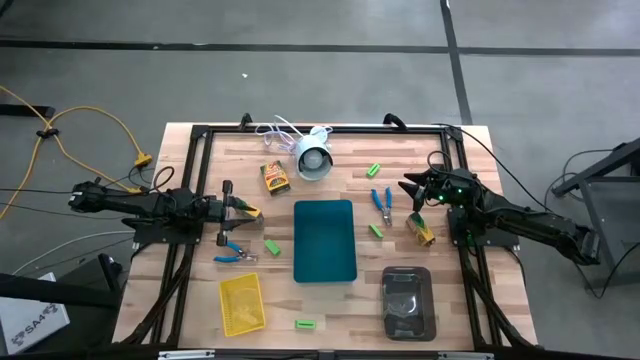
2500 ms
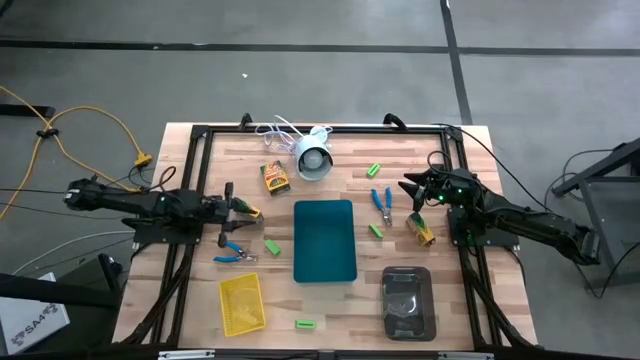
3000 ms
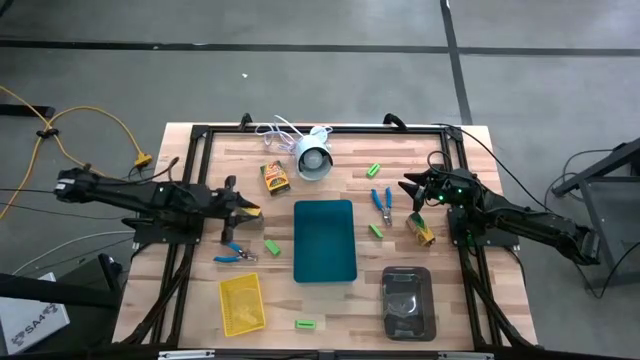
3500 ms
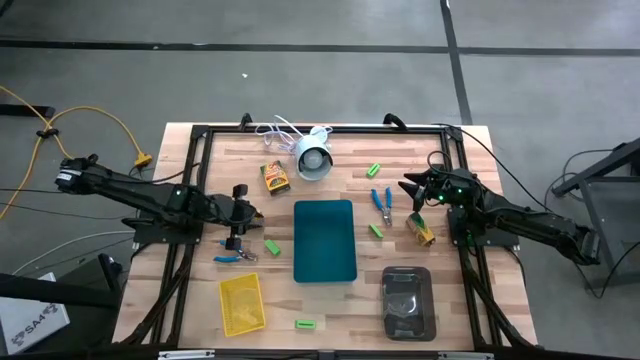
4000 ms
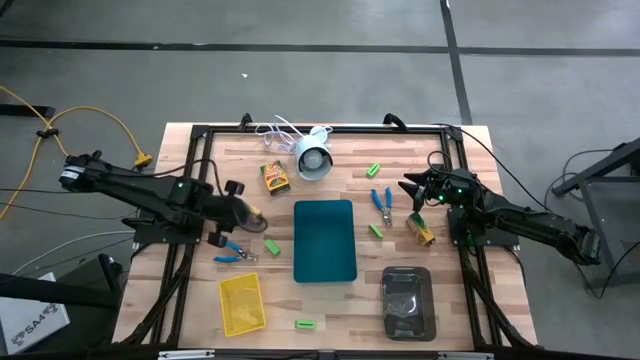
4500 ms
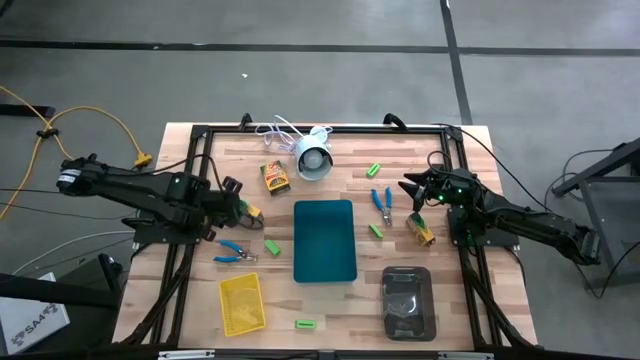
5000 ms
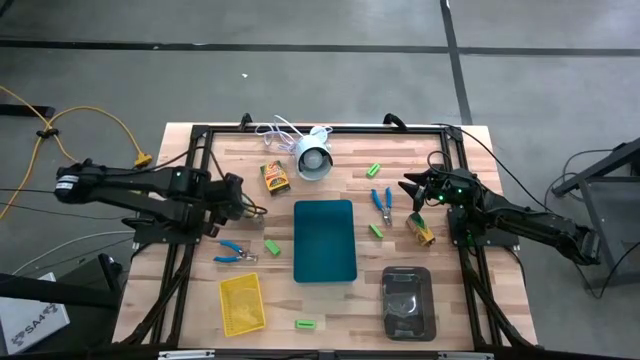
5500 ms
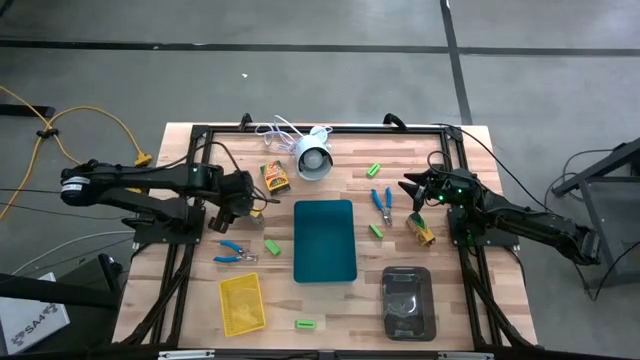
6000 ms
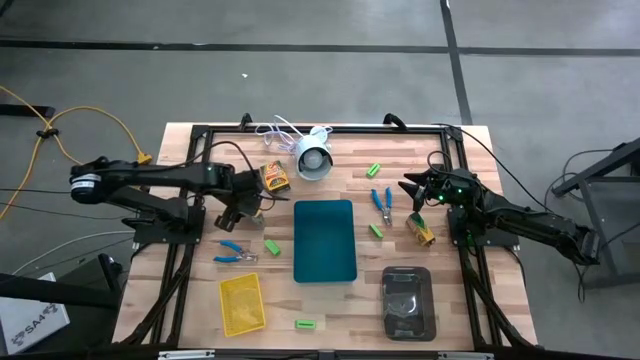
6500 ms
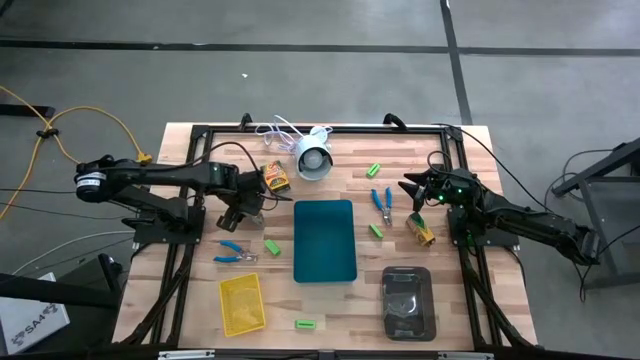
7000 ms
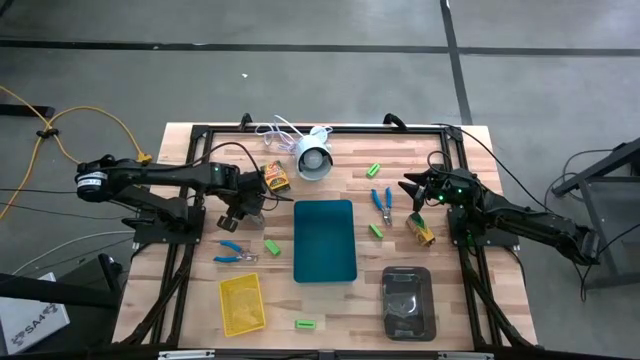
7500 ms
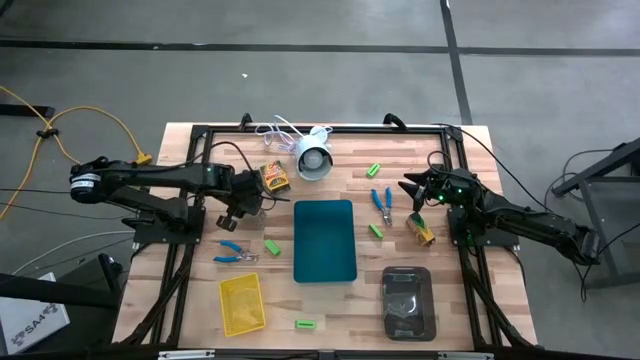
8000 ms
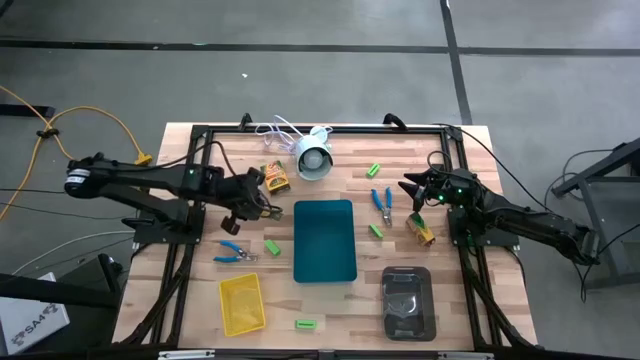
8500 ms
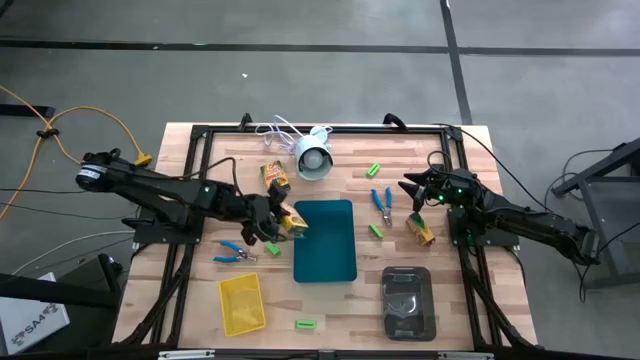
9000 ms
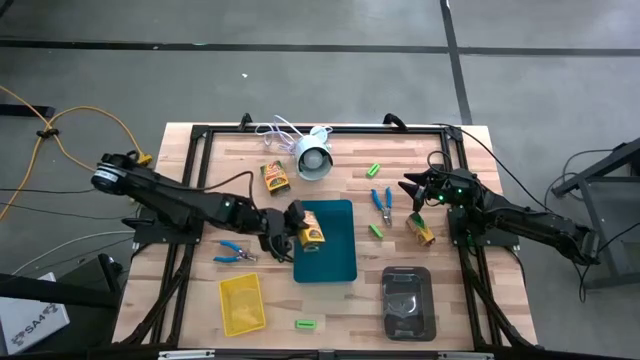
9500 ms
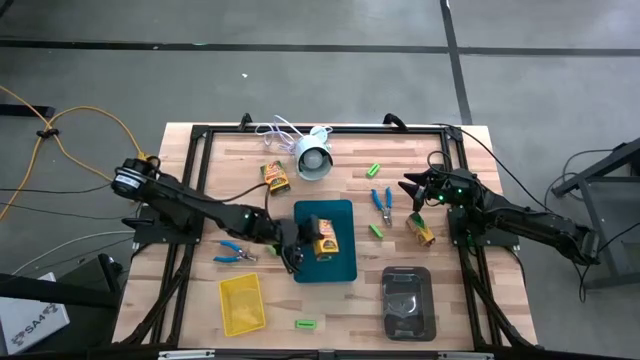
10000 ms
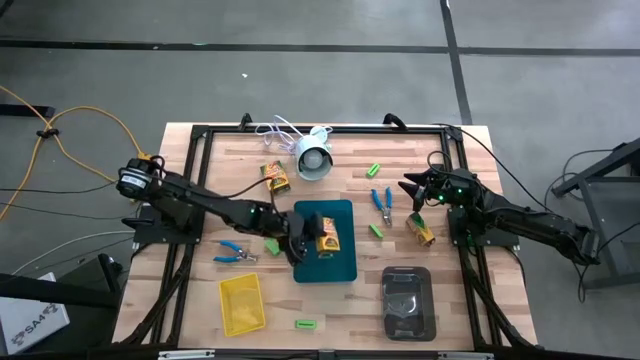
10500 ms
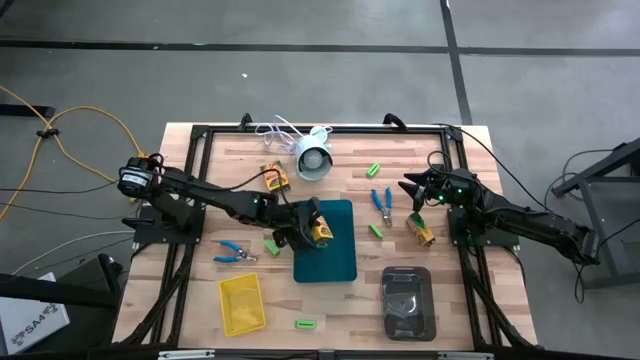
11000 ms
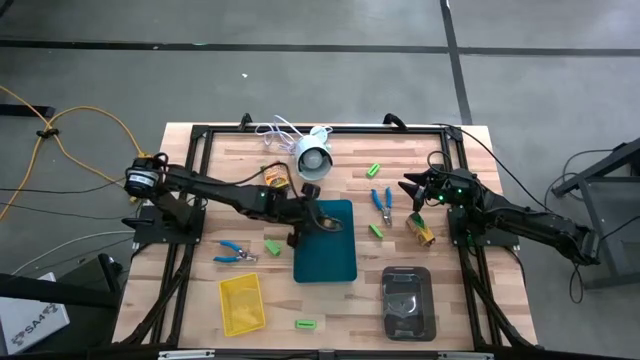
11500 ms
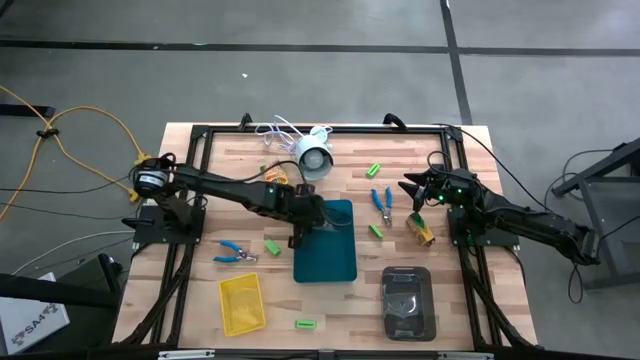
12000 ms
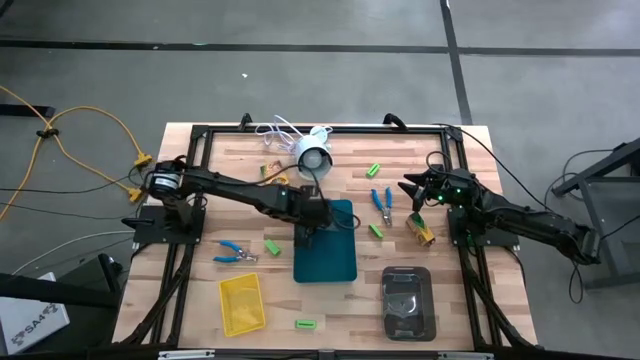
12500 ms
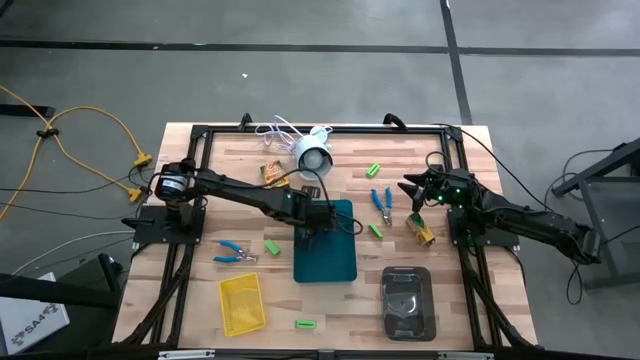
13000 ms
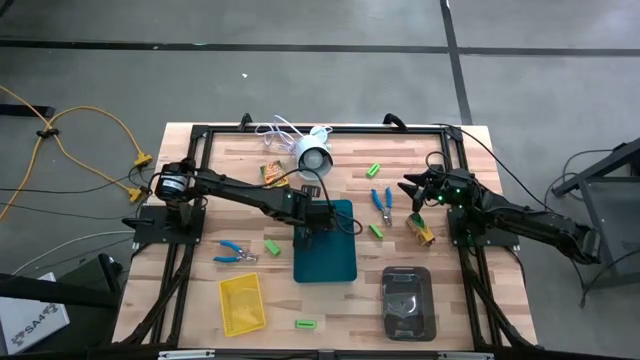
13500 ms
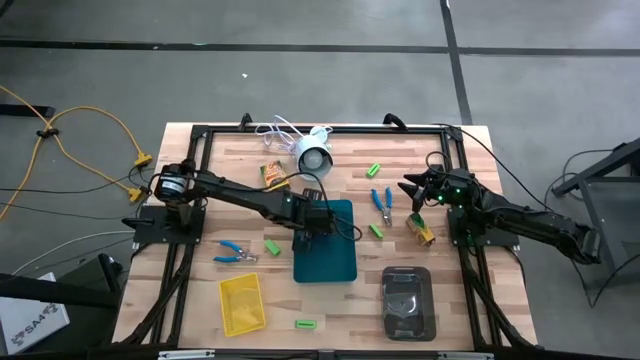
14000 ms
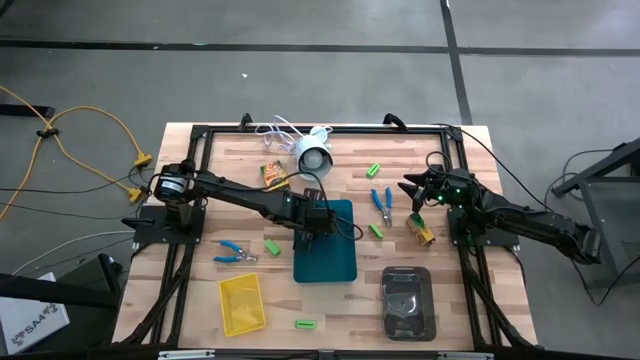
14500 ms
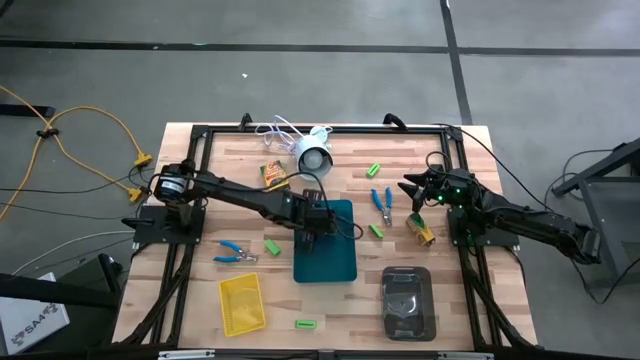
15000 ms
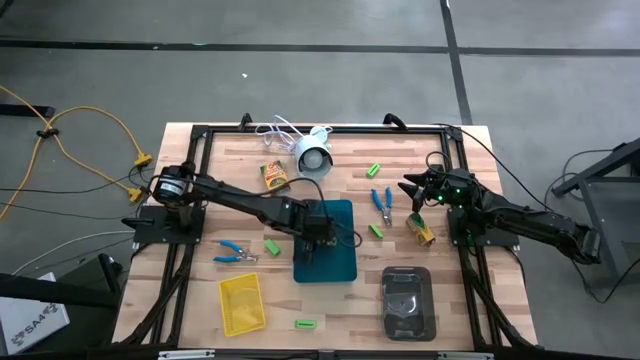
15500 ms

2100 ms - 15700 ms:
Task: Pick & Place School Supplies
Put the yellow crayon box into the blue bin

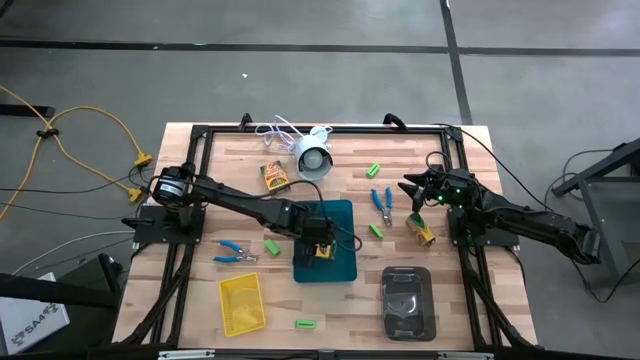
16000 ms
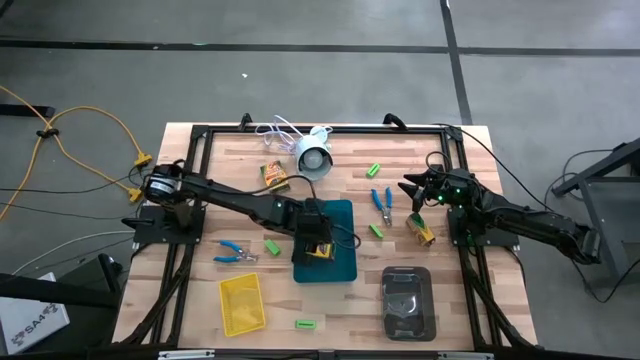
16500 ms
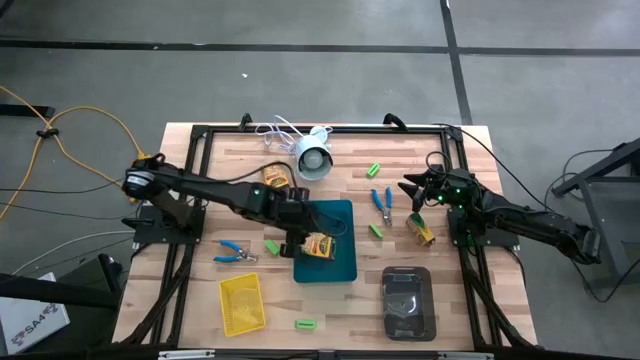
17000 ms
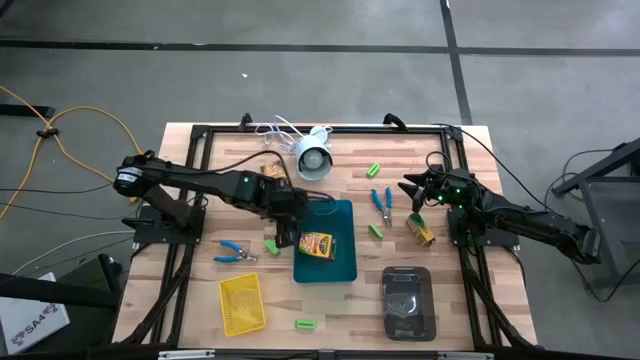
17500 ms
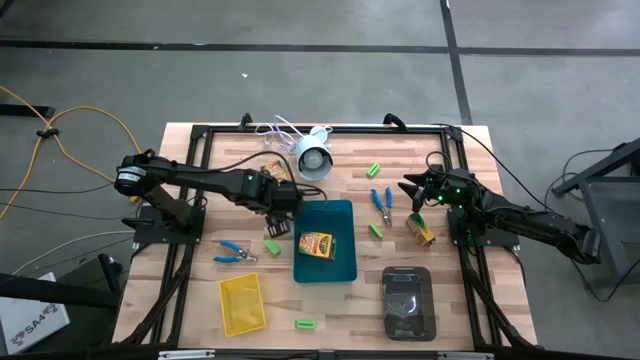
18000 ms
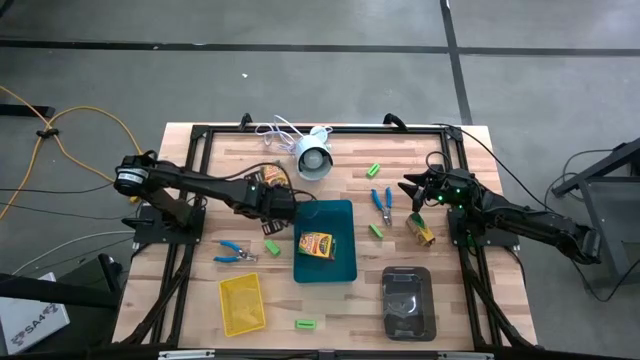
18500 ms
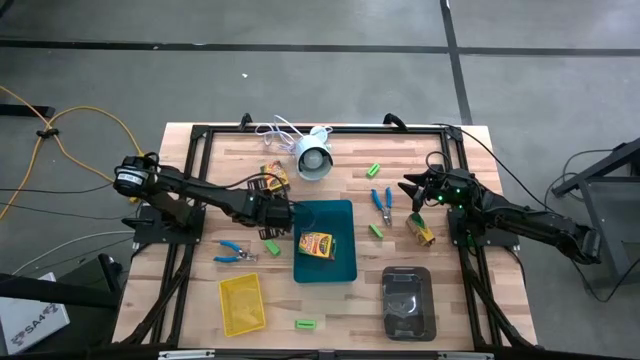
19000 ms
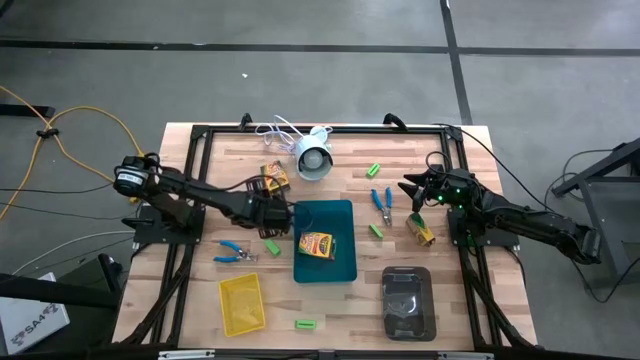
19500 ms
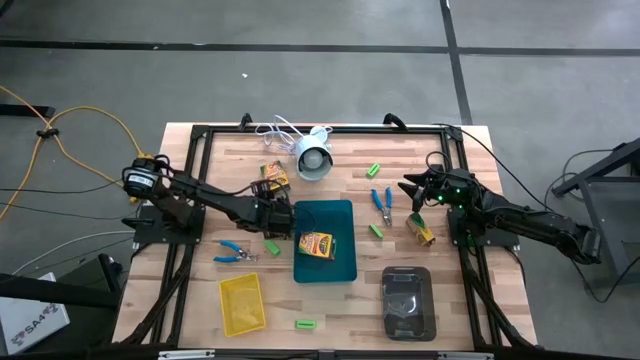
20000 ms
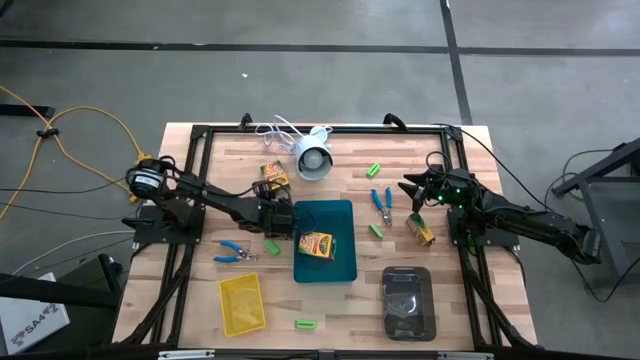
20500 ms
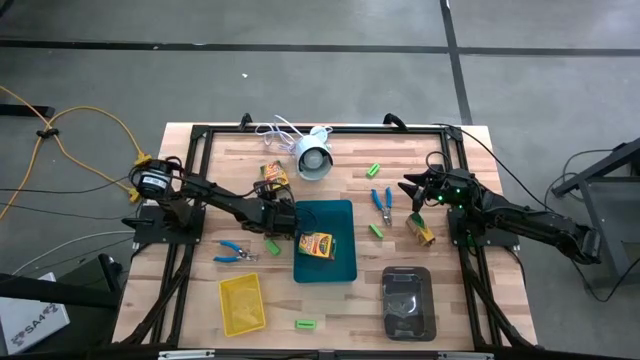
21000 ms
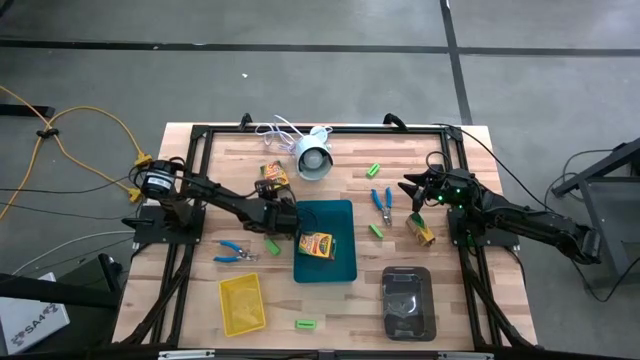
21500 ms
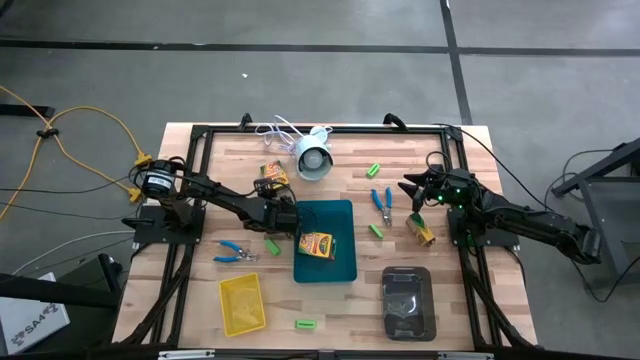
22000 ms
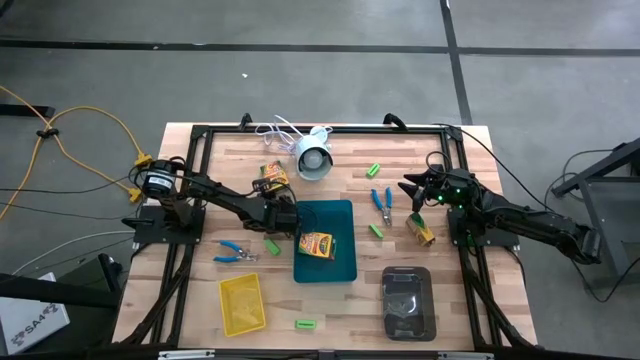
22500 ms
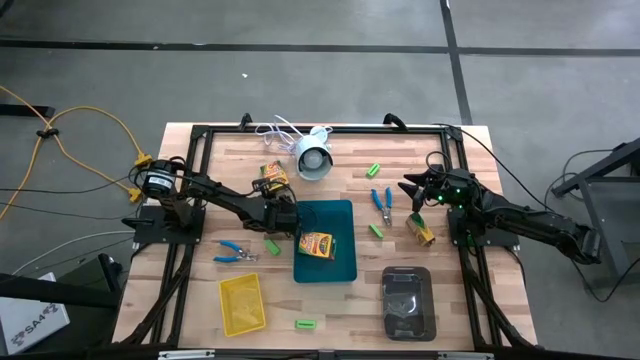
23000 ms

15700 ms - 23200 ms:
Put the yellow crayon box into the blue bin

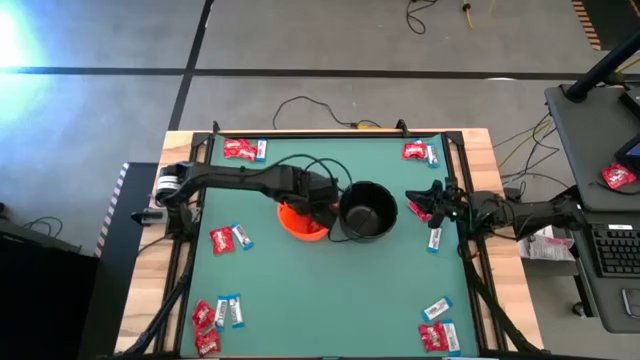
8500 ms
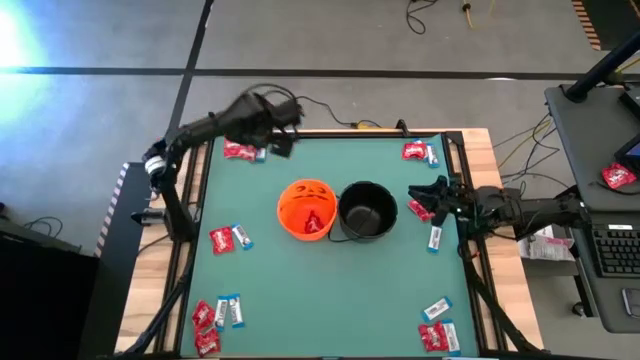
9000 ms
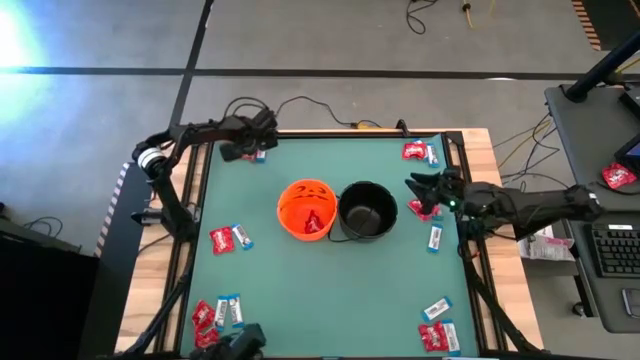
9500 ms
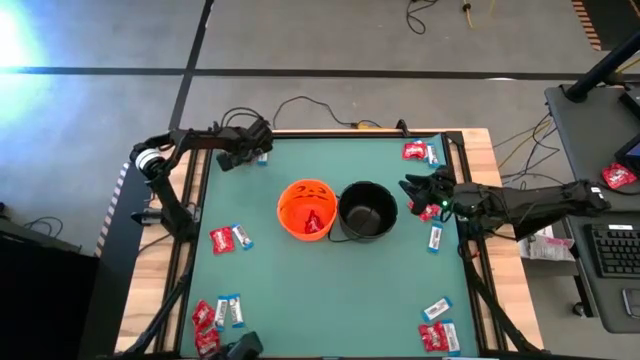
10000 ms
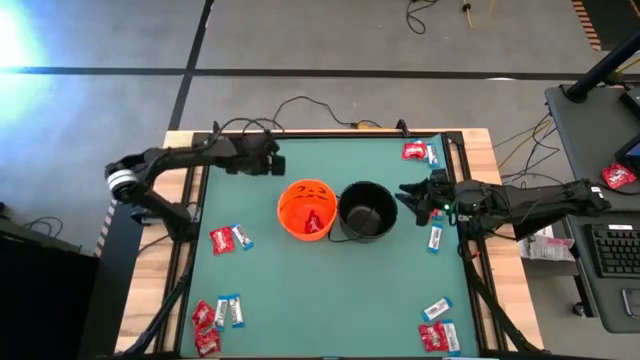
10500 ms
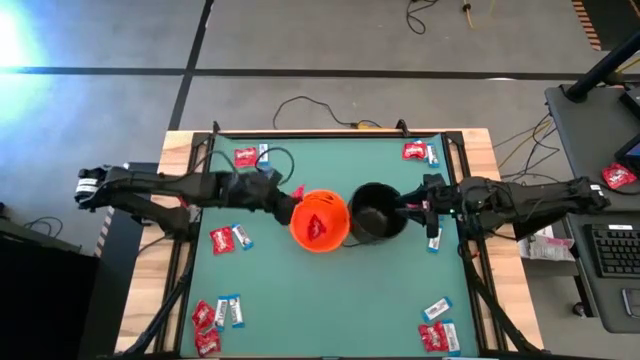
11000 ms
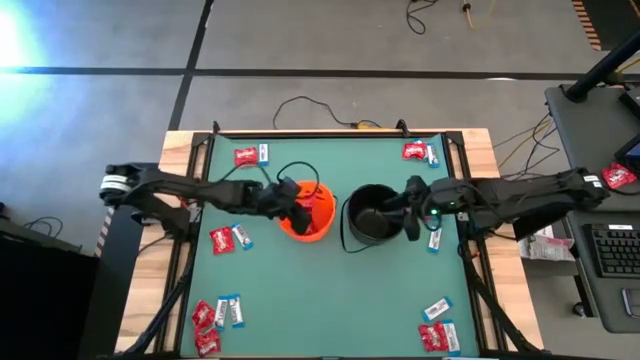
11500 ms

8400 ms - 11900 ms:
Task: Sort candy by brand, put in halloween buckets
Put the red candy into the orange bucket
